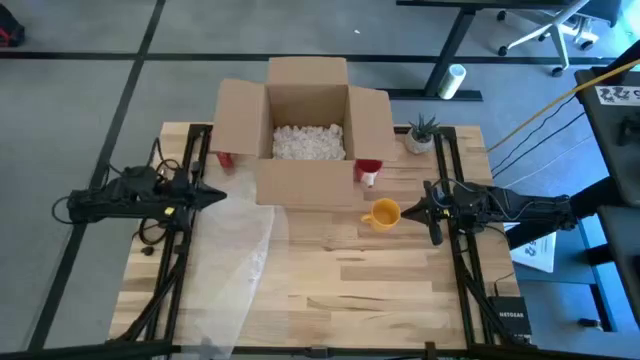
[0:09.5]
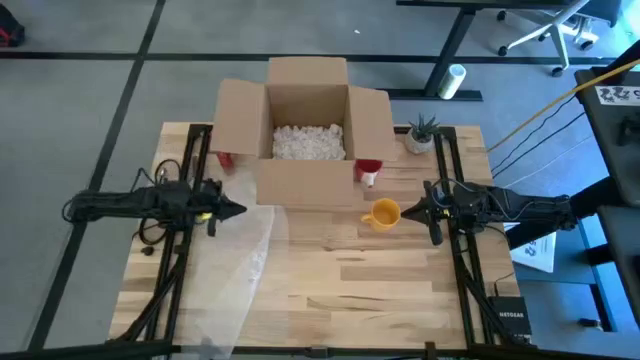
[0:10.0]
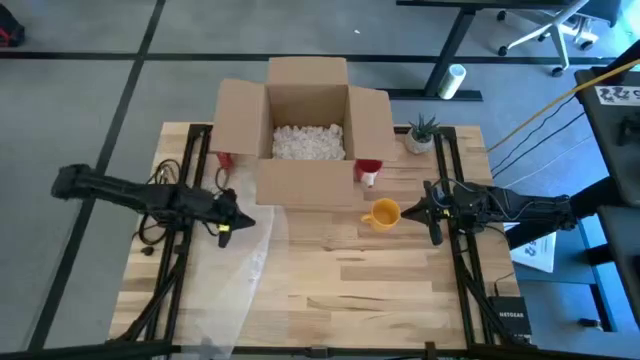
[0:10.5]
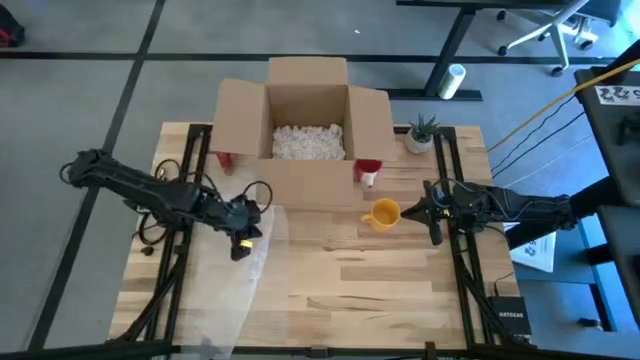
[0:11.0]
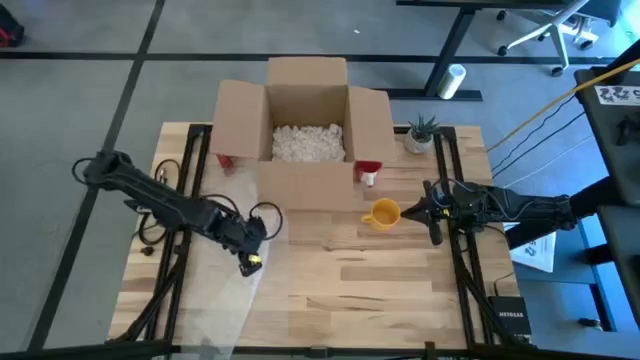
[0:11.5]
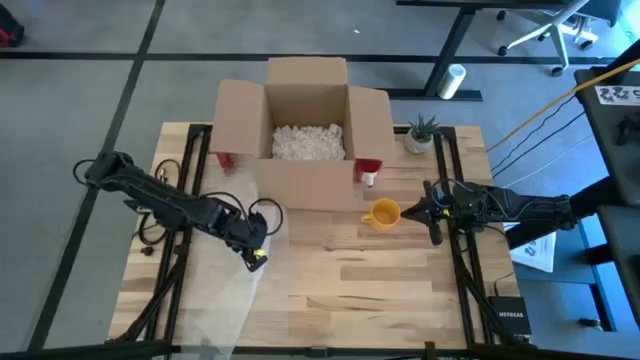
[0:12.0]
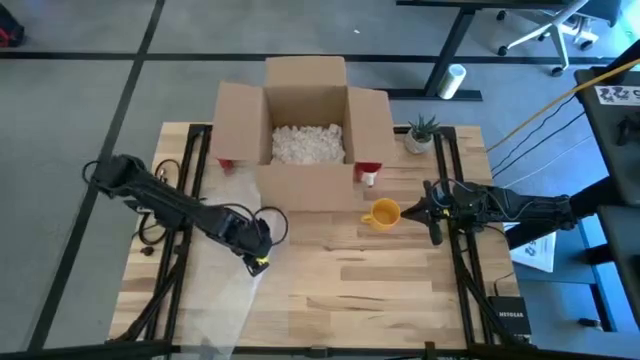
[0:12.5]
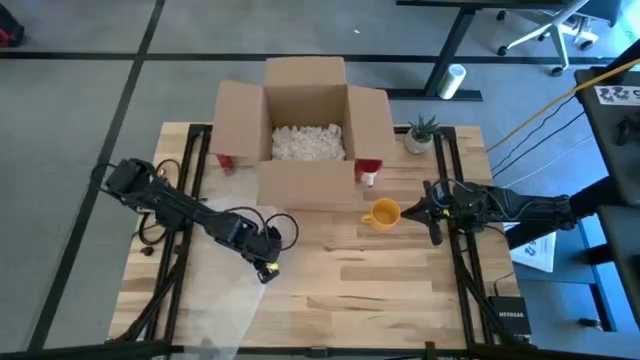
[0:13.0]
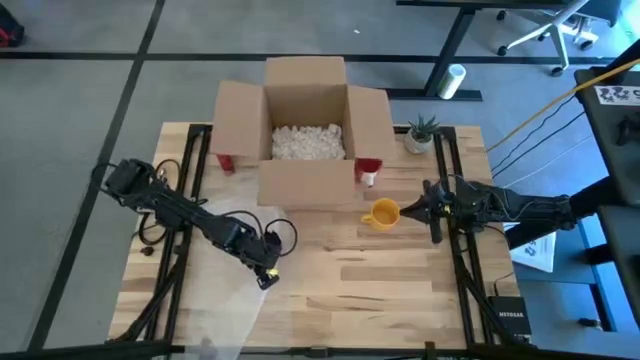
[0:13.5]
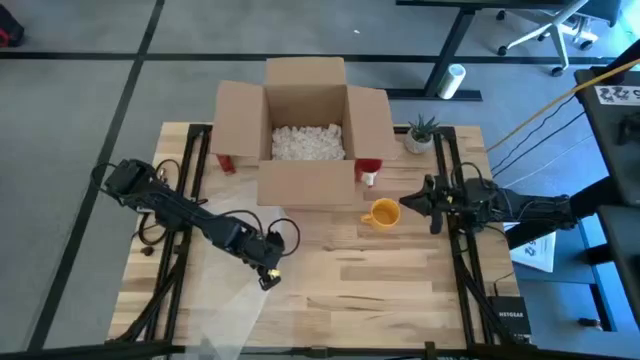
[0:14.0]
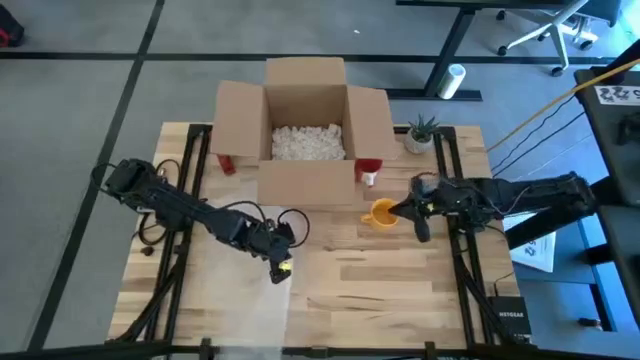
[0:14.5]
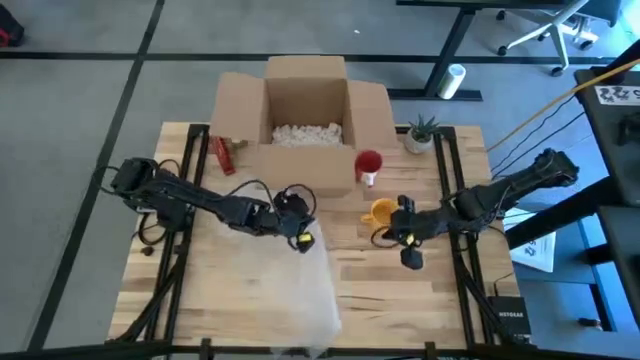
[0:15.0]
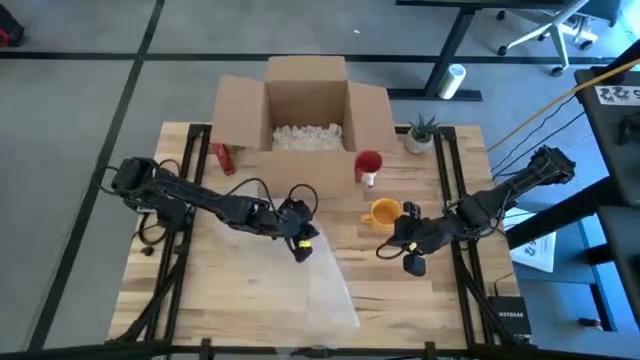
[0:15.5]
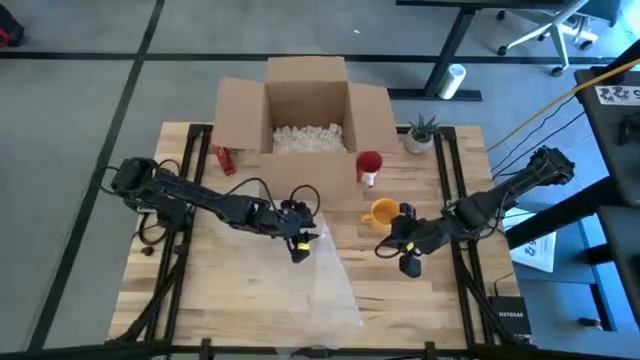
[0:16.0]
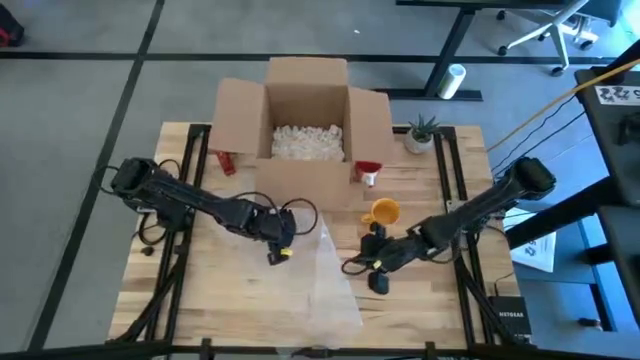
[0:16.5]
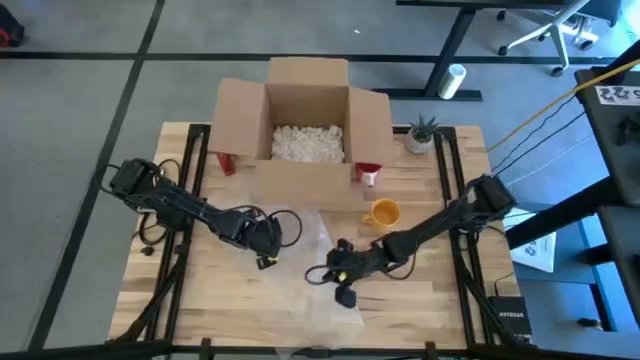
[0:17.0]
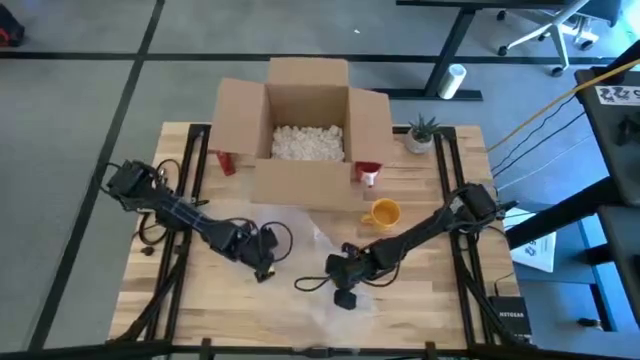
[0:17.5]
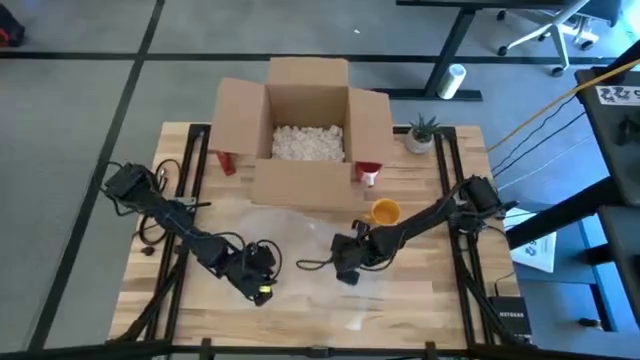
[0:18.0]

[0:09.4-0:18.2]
Task: wrap mug
Adjust the bubble wrap

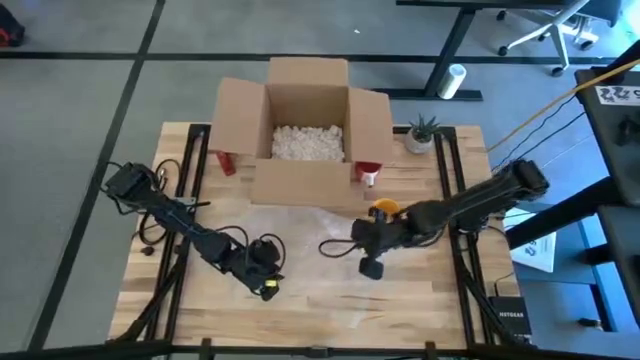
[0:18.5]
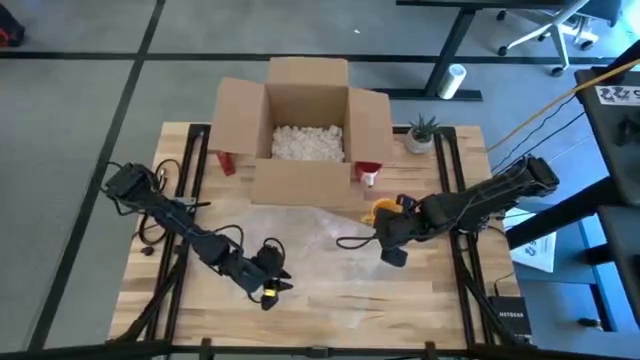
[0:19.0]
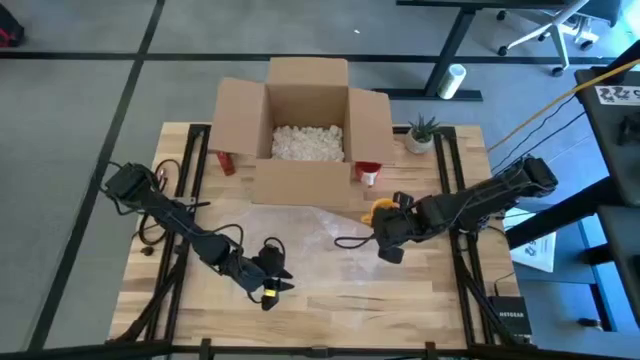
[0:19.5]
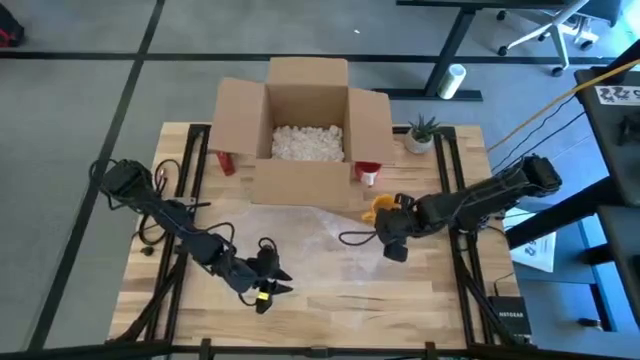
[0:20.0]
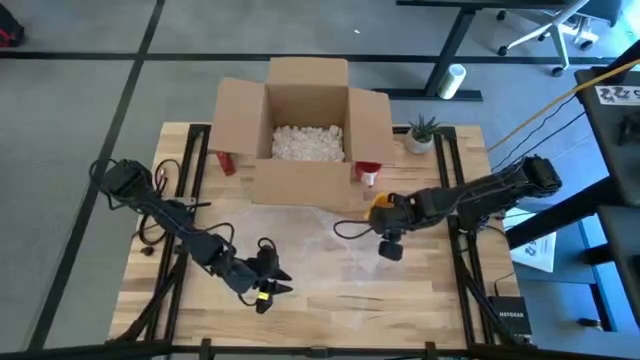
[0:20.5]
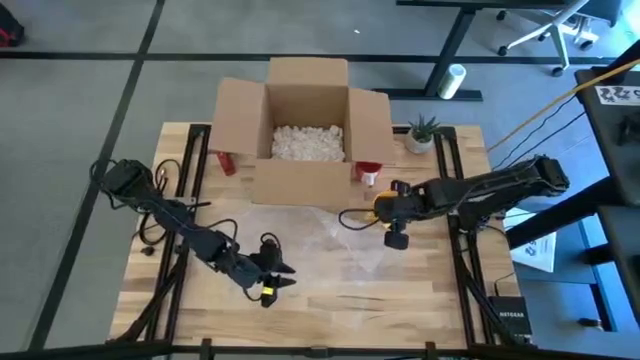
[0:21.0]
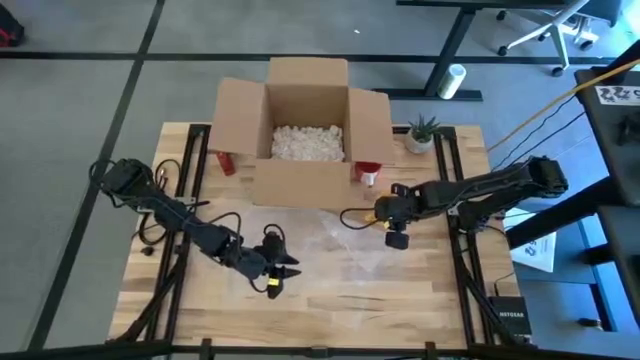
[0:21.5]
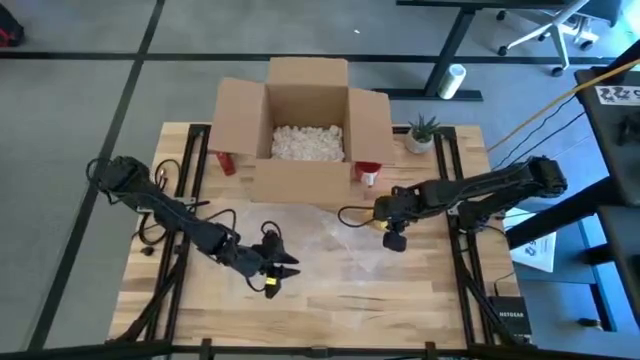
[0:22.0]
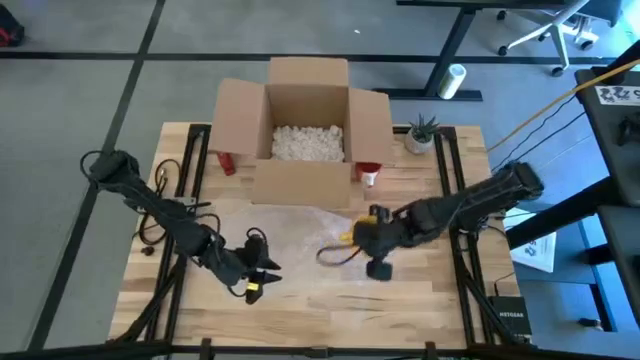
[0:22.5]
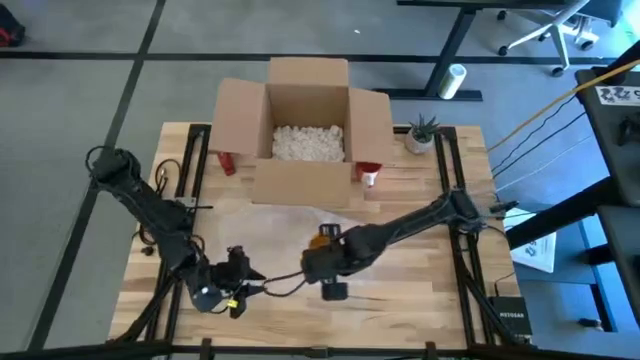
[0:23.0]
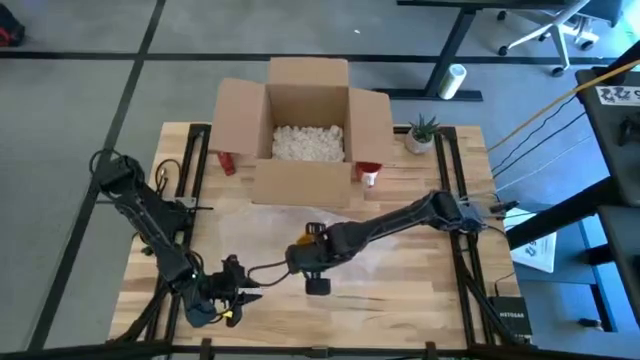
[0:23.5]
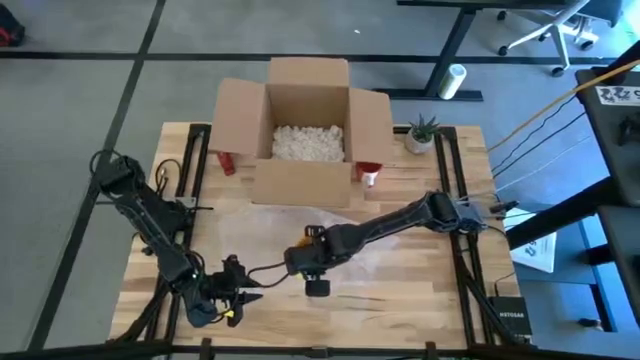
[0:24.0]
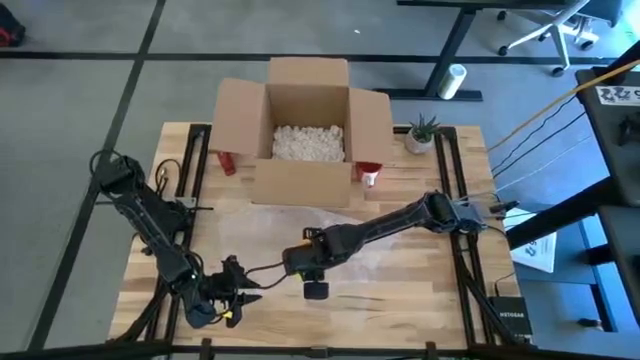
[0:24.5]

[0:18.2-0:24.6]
Put the yellow mug on the bubble wrap

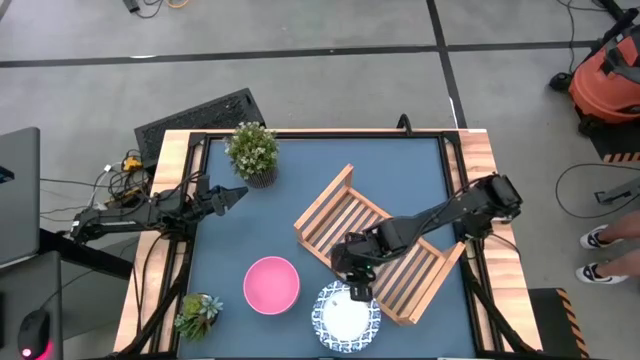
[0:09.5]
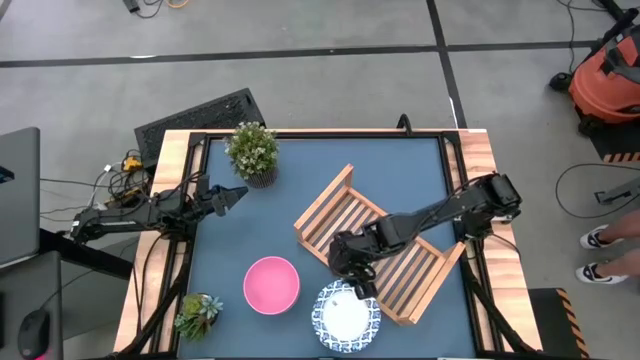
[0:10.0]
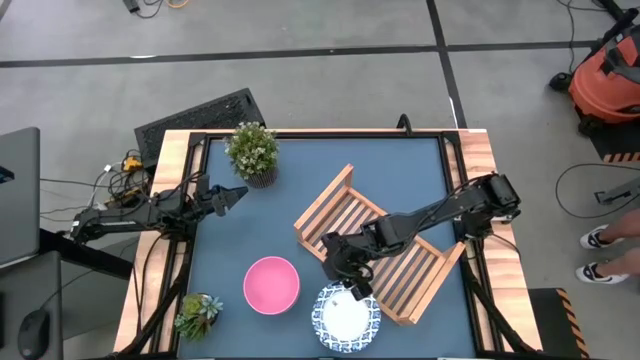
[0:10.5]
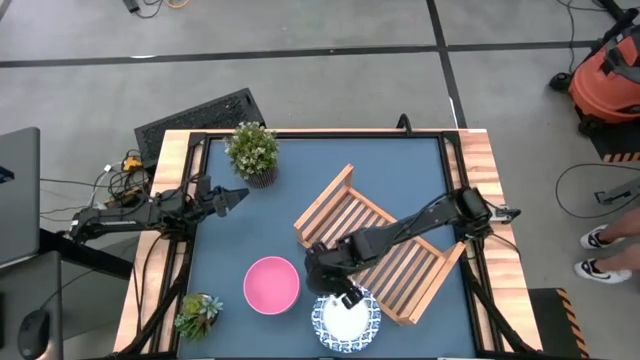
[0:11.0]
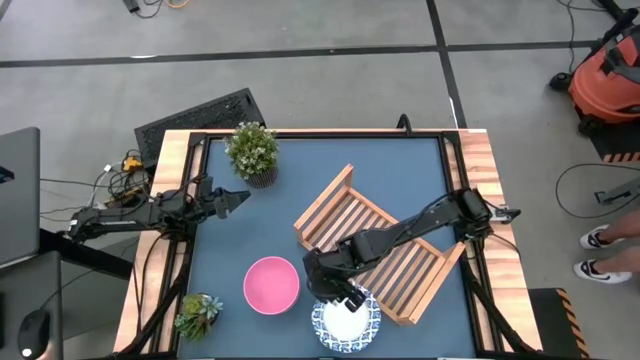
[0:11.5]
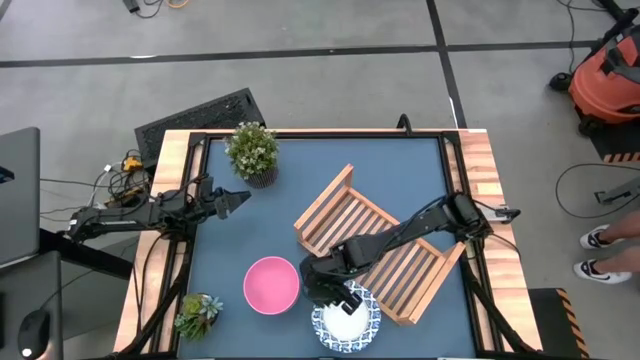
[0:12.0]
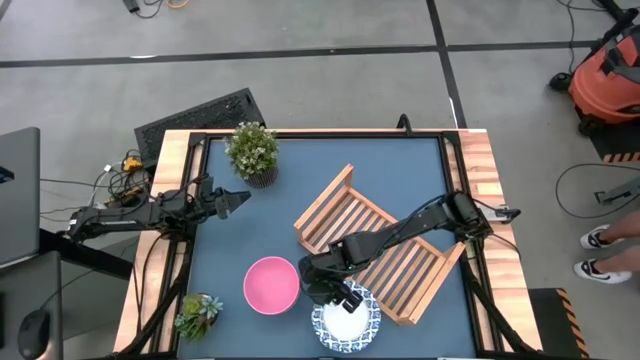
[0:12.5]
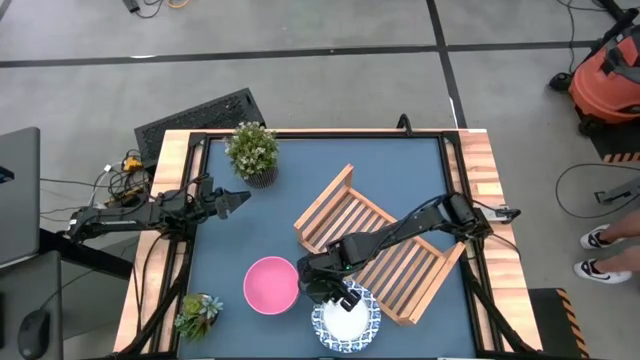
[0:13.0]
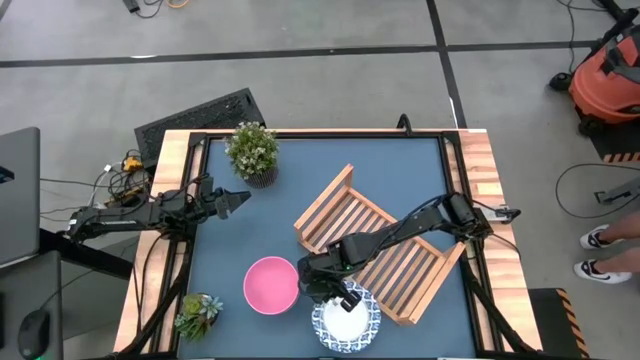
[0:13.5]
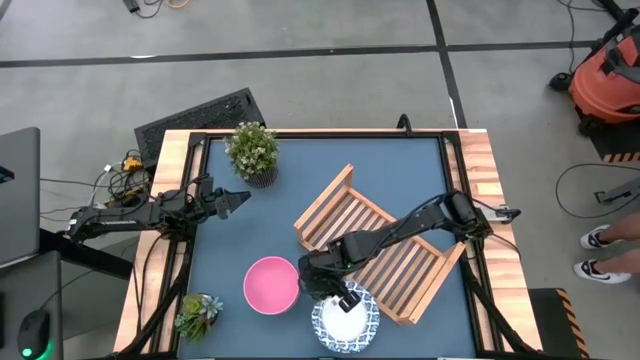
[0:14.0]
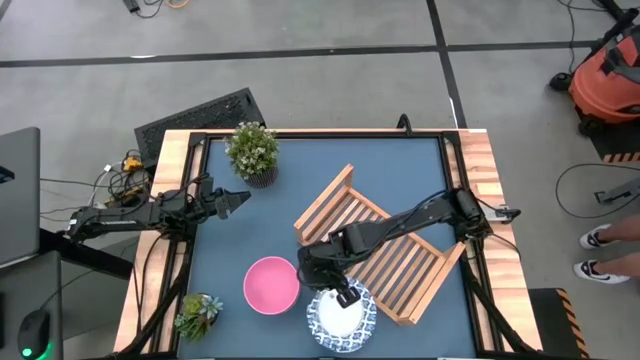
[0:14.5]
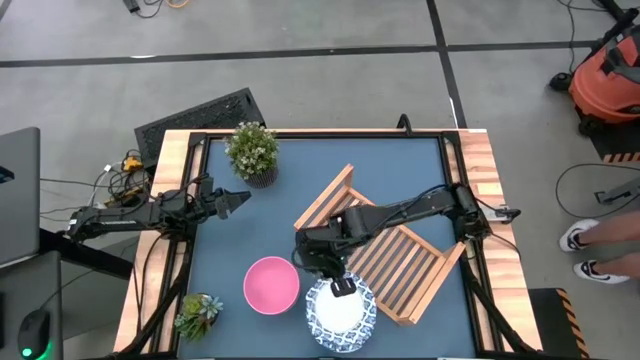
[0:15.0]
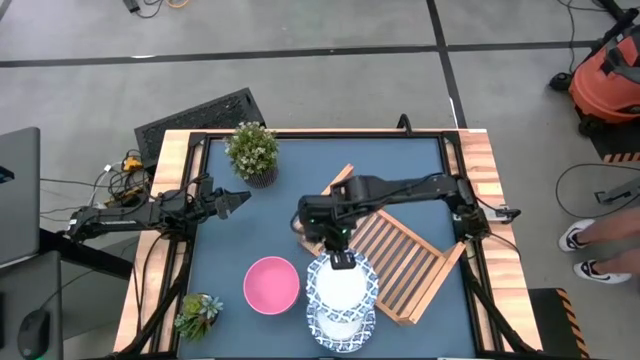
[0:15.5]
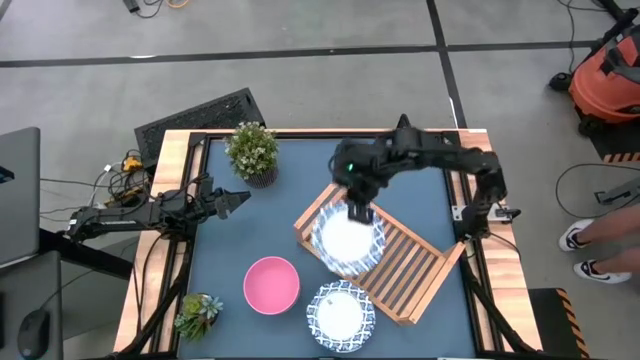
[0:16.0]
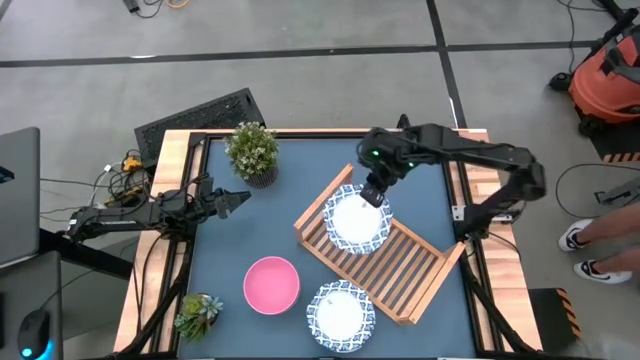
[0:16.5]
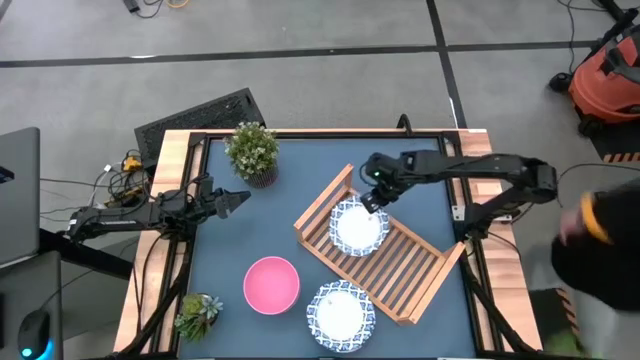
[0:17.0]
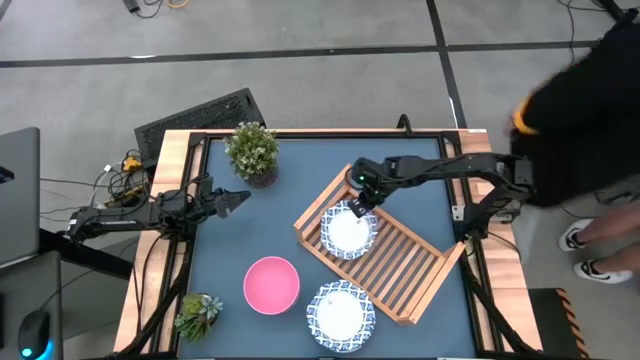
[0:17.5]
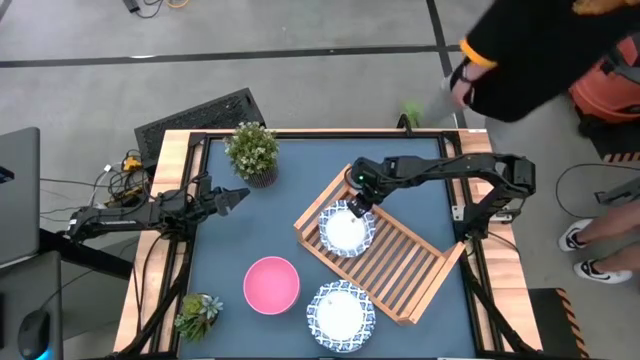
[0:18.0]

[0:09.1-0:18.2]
Task: Place and stack bowls onto a shelf
Put the blue patterned bowl on the shelf
